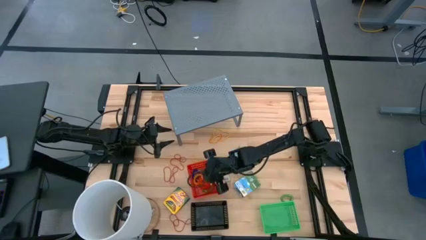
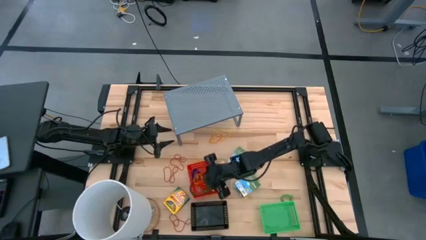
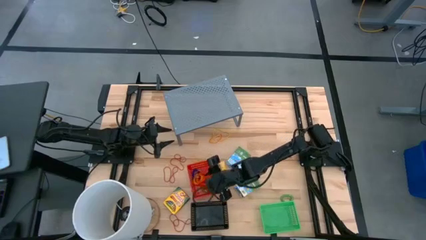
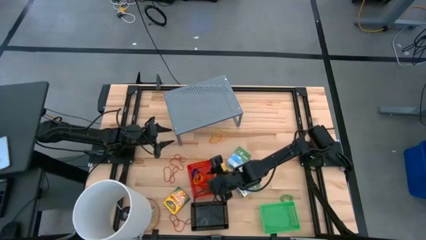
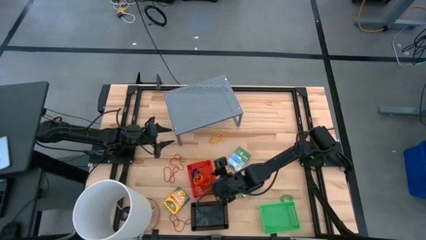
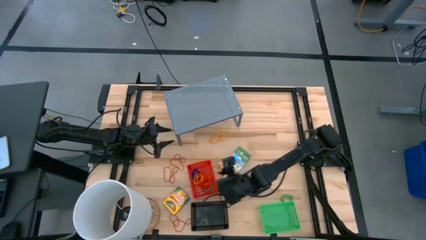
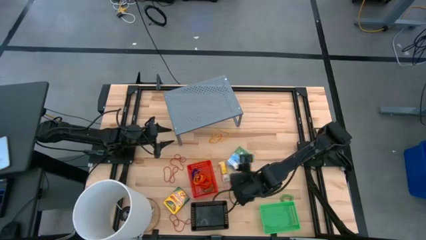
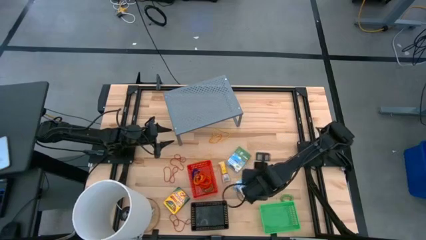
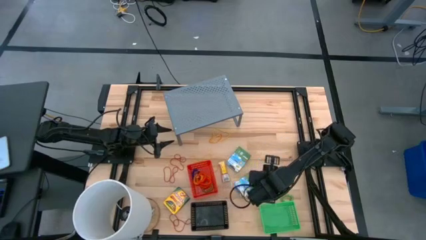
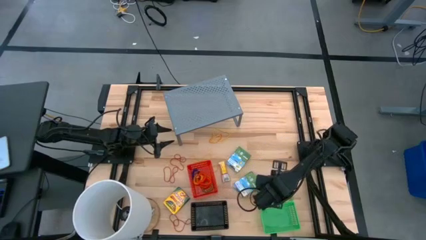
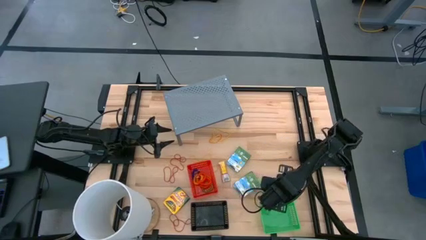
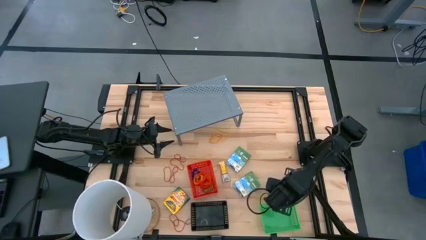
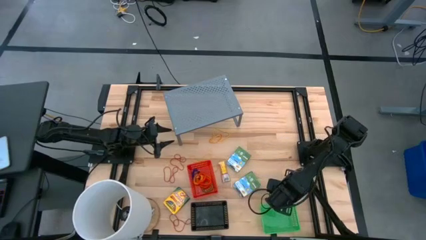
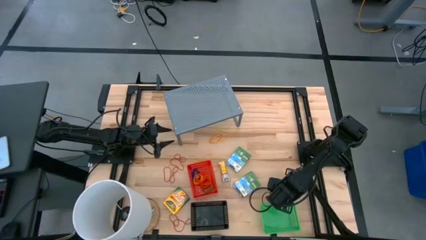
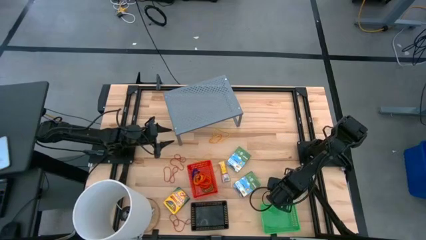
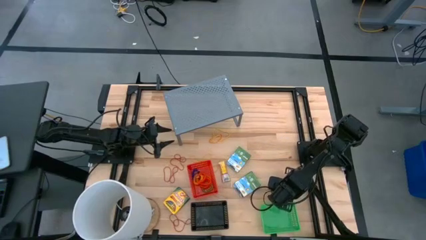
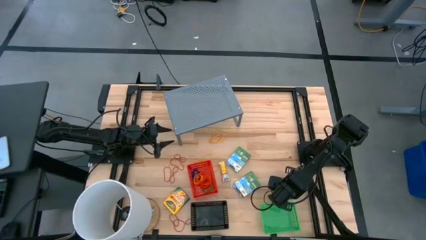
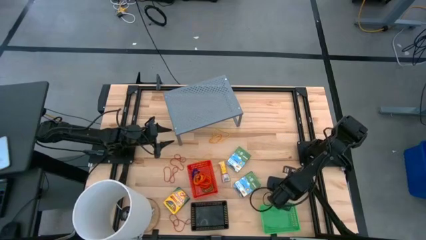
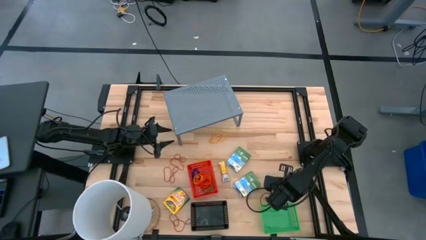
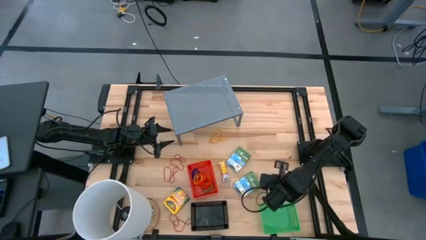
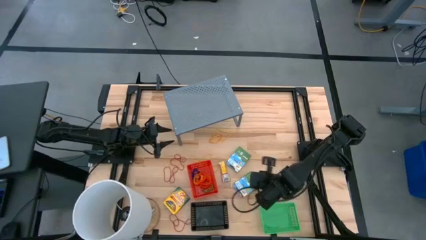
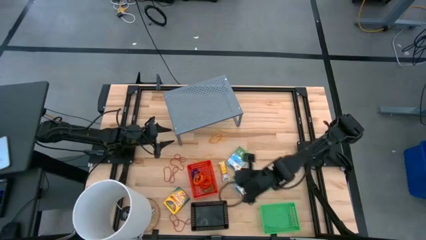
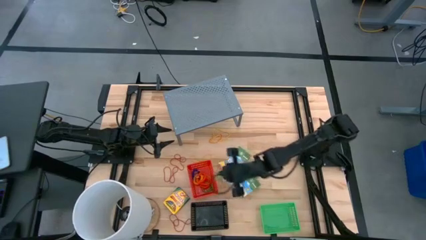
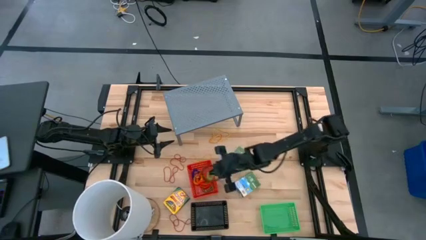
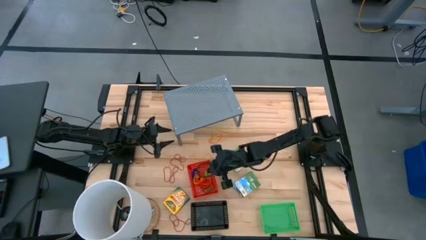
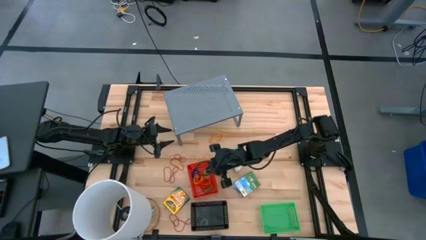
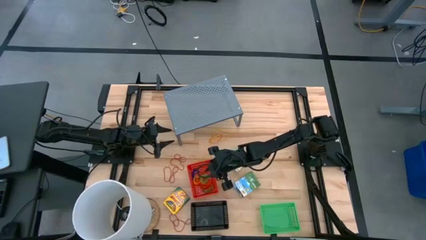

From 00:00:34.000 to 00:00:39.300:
Task: Pick & Place Office Desk Supplies
Put the green spring keychain into the red bin

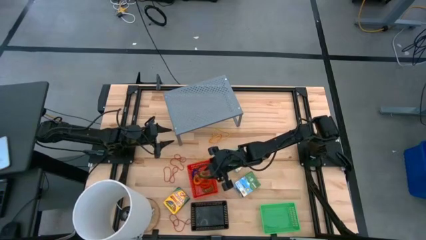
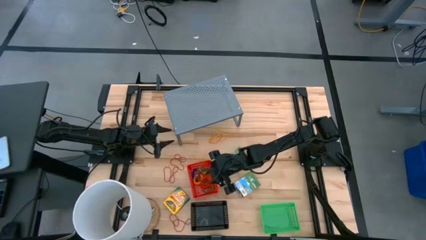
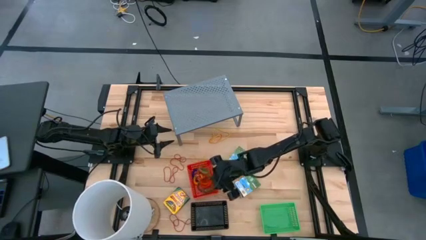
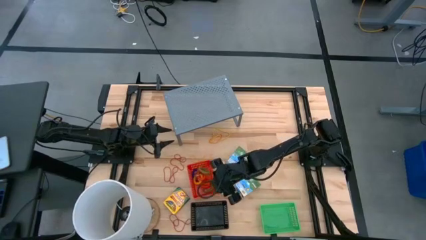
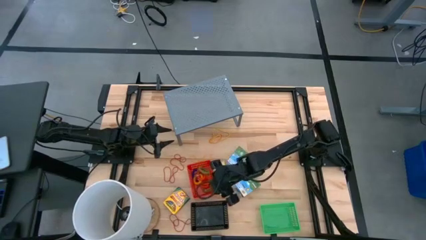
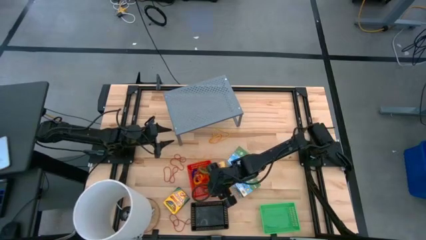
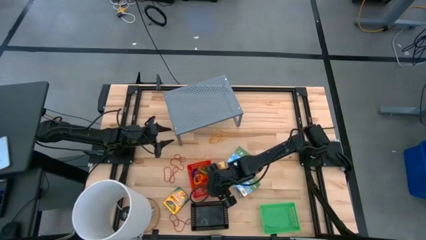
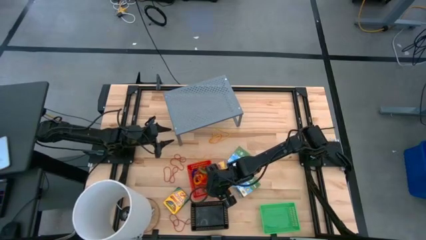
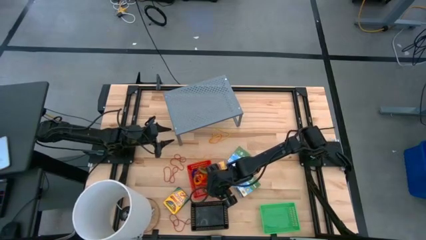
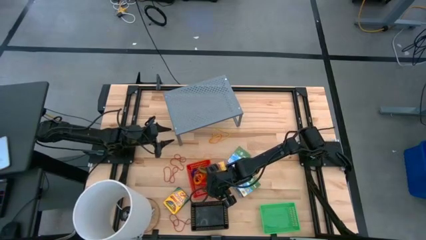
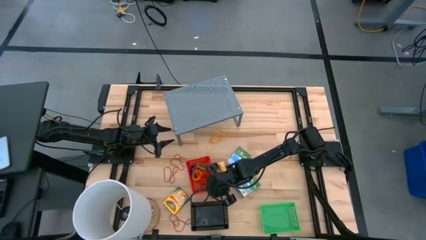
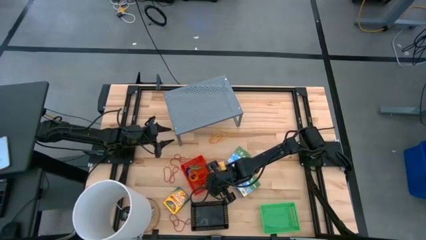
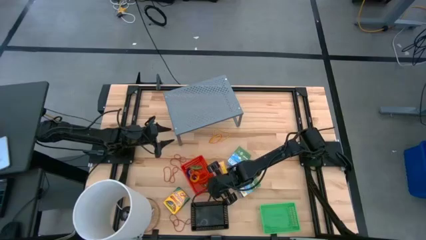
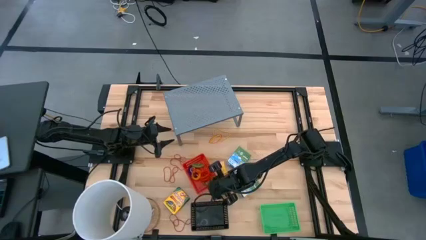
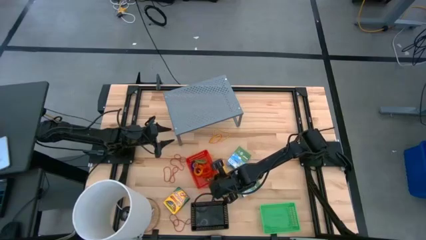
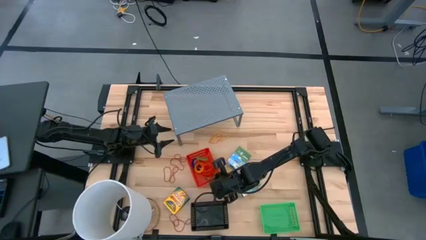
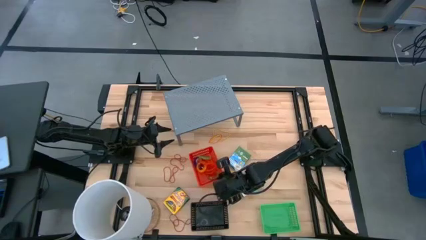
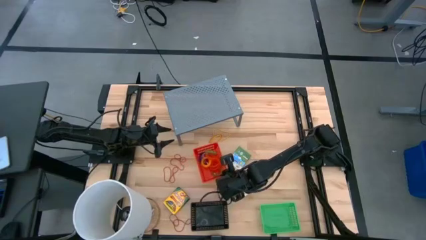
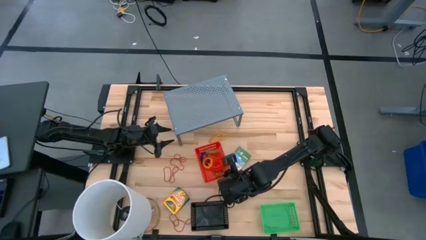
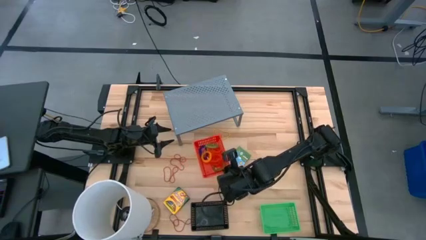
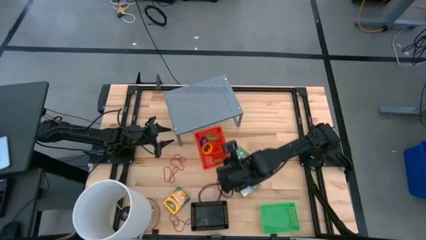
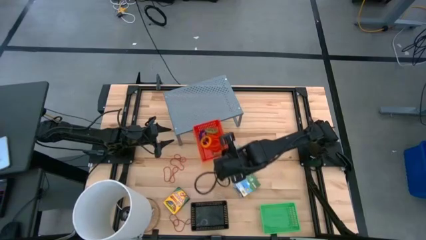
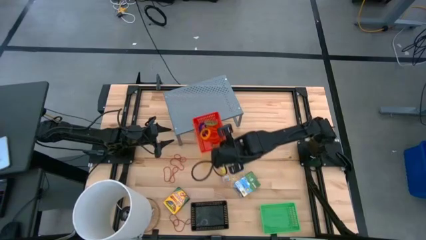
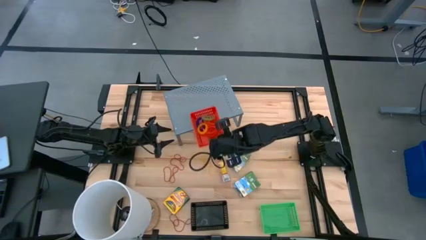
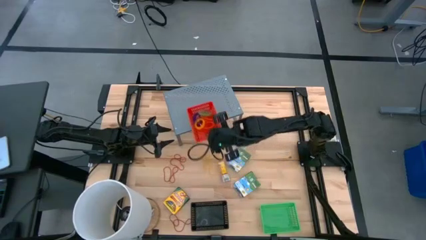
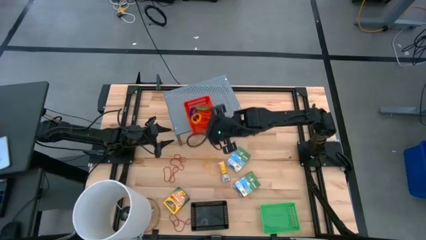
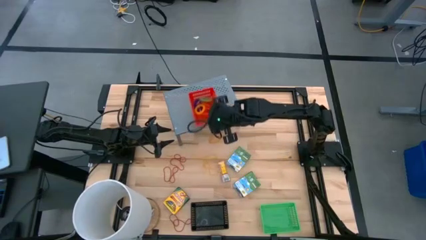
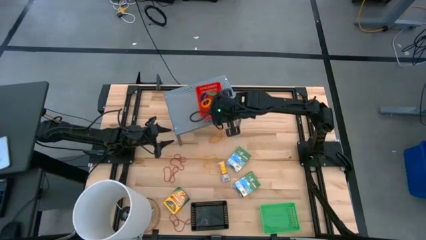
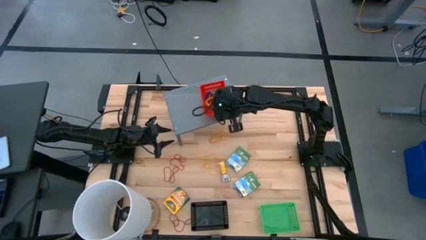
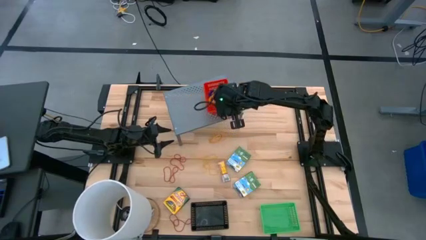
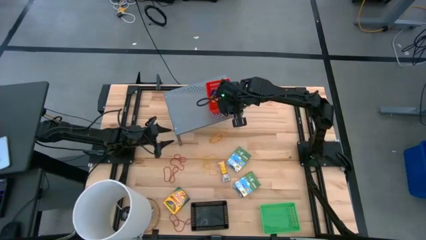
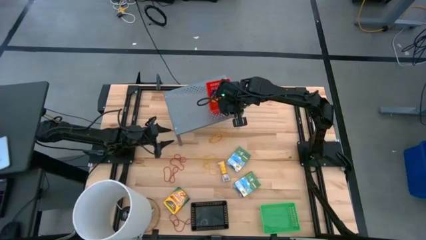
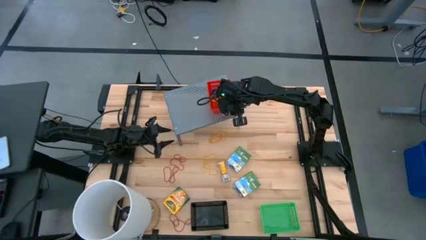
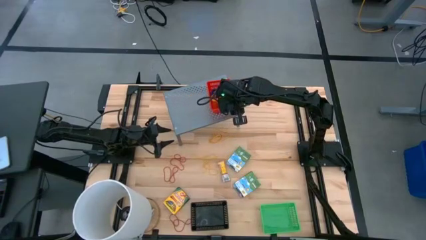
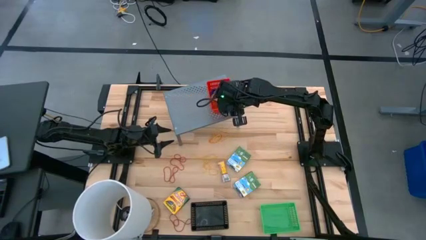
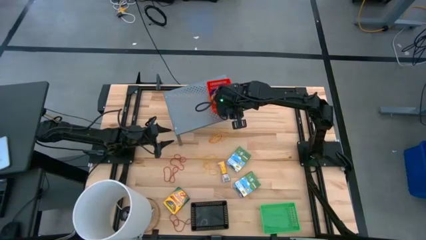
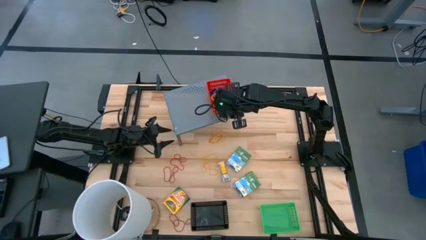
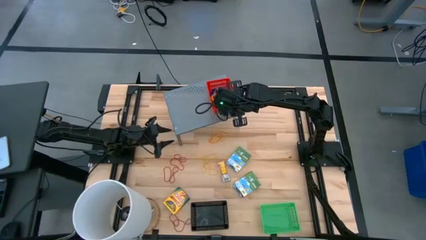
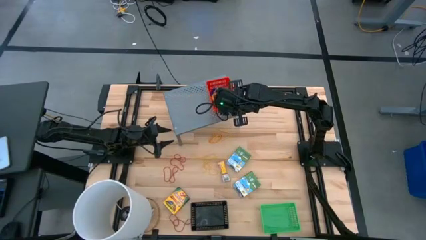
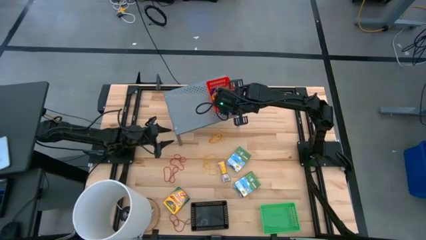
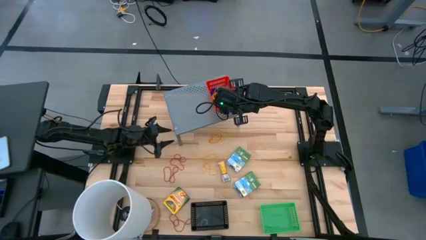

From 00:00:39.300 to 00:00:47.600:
Put the red bin on the shelf

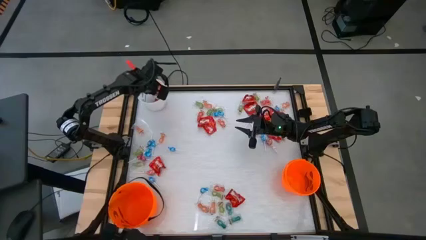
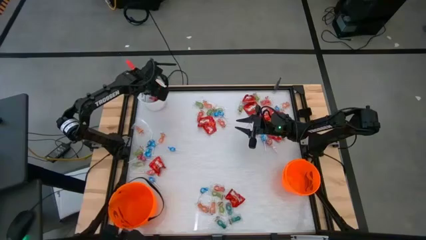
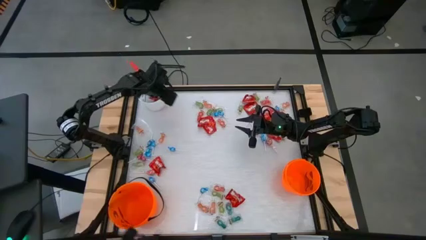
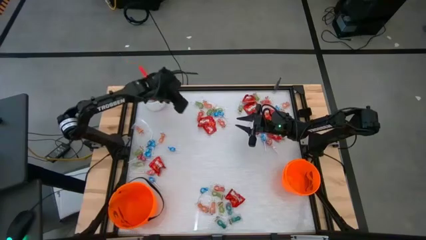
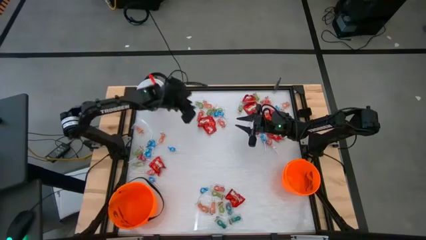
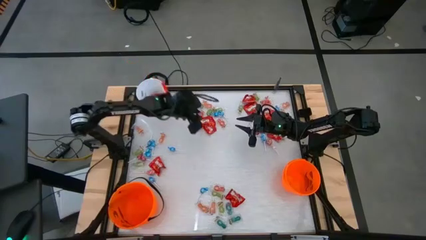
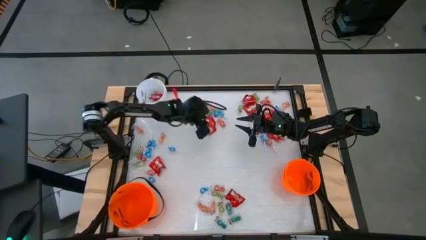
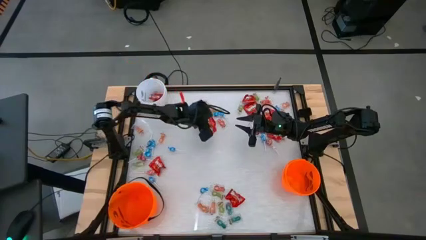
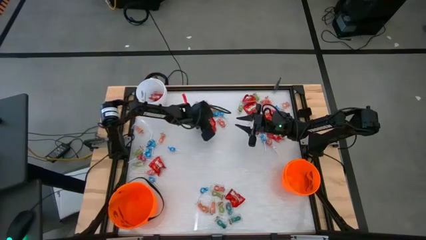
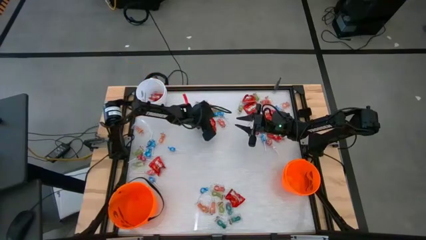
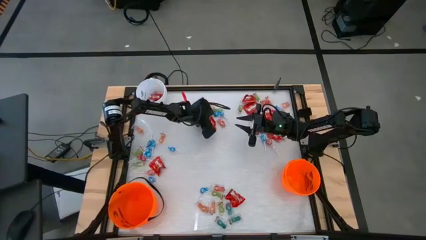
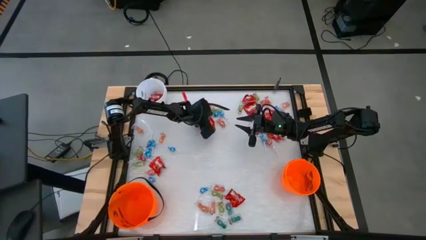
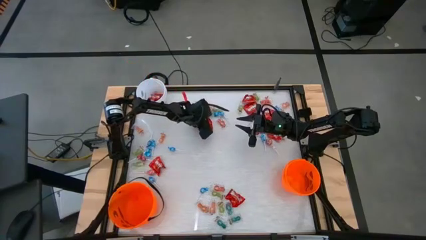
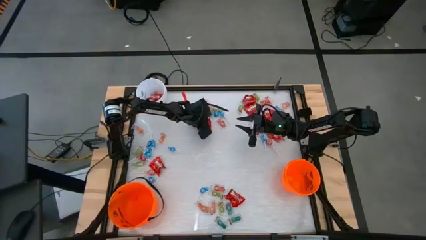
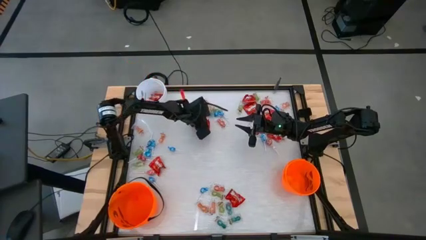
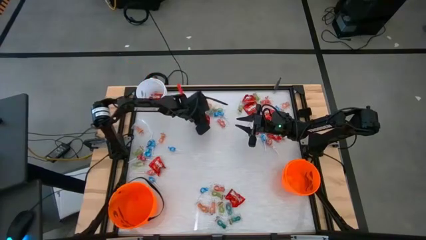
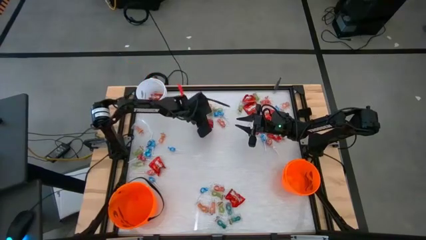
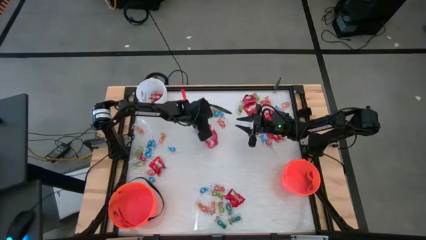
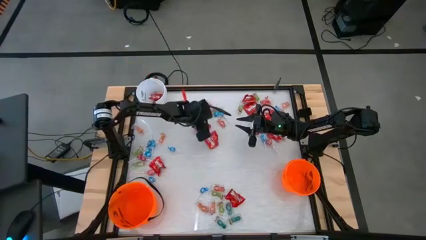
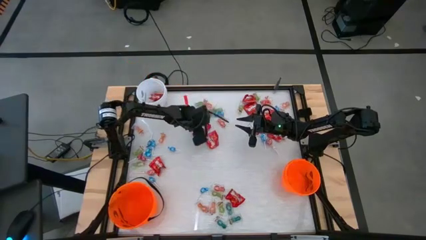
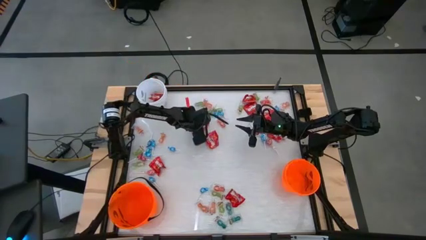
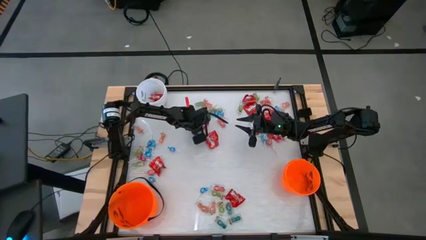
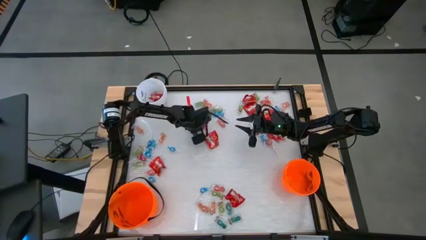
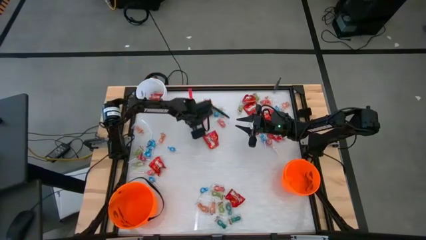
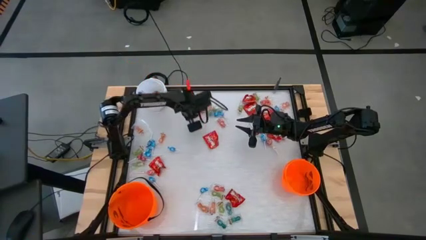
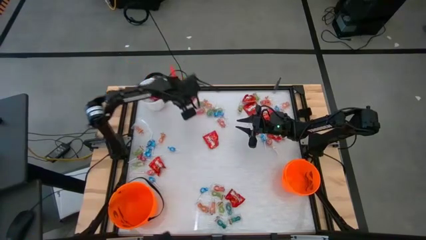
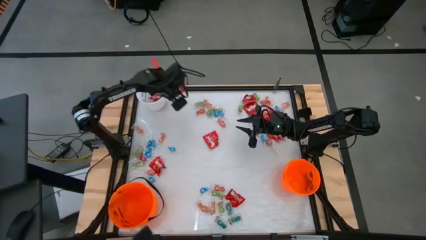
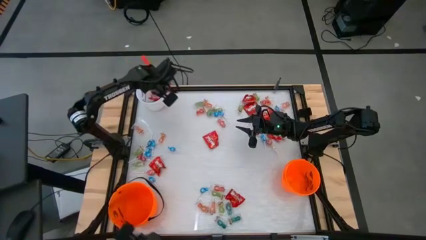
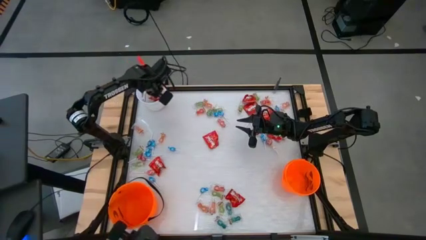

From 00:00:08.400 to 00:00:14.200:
Task: Sort candy by brand, put in halloween buckets
Put the skittles into the white bucket
